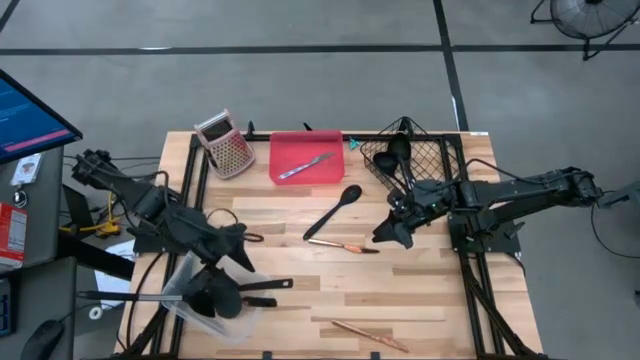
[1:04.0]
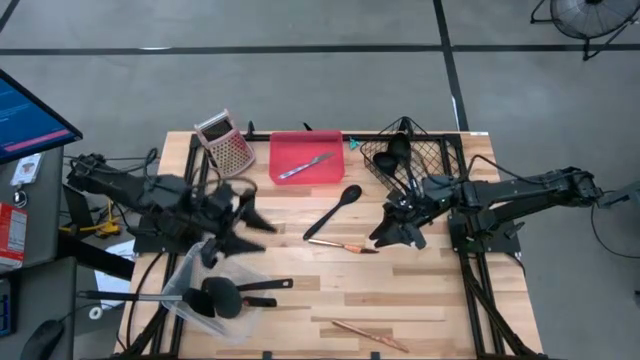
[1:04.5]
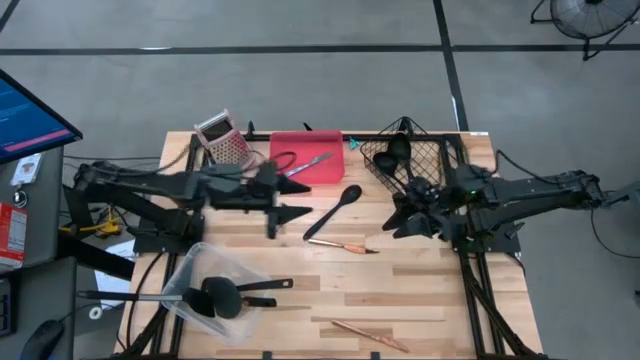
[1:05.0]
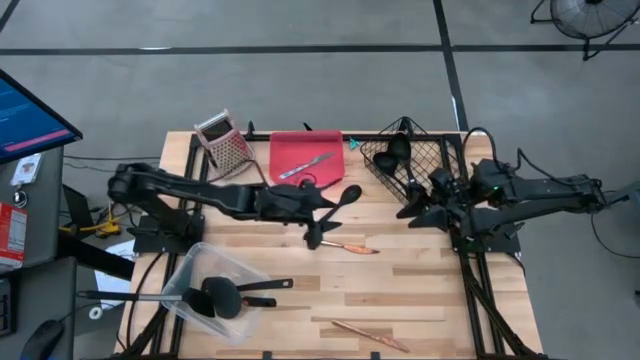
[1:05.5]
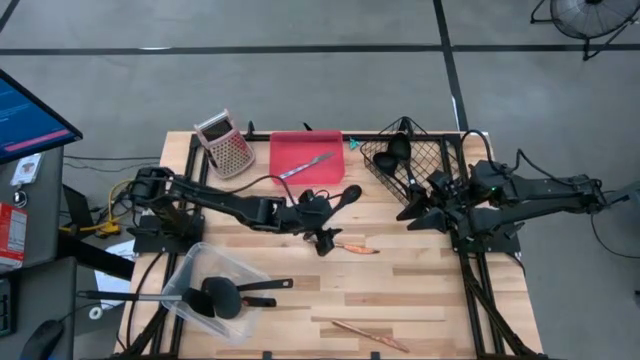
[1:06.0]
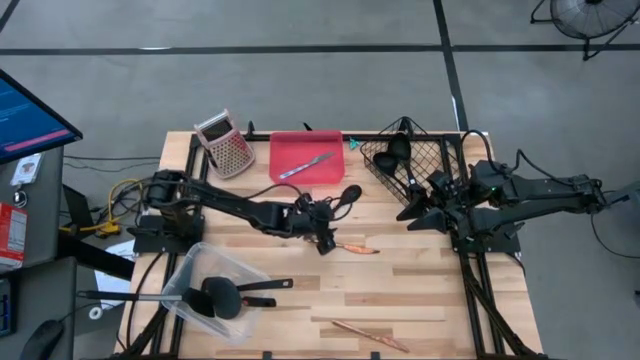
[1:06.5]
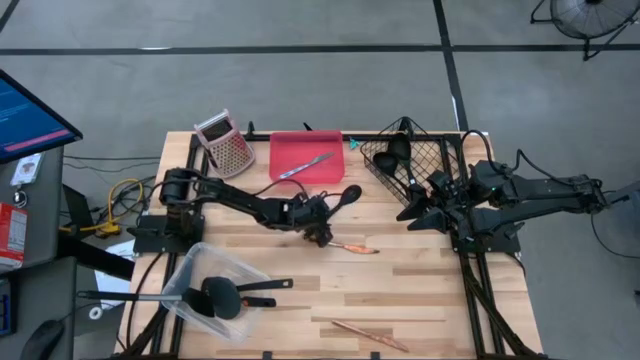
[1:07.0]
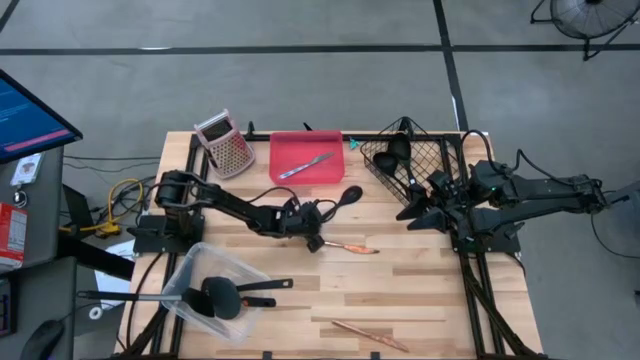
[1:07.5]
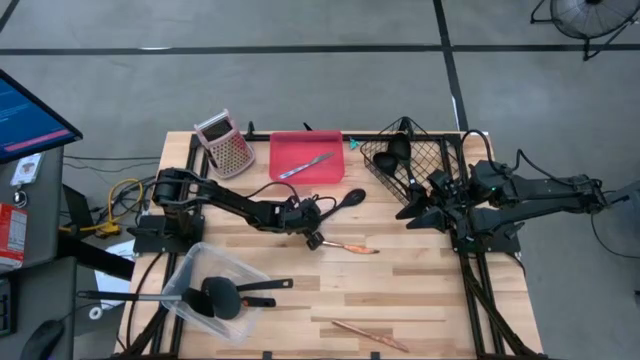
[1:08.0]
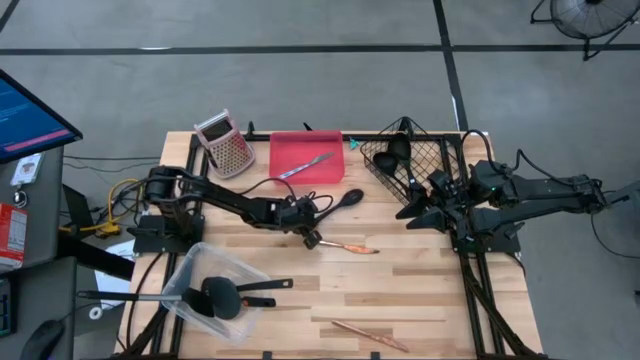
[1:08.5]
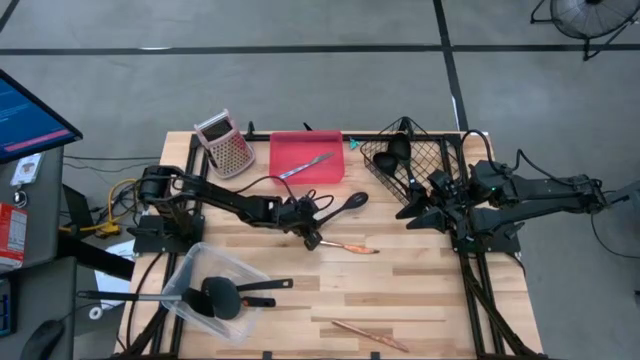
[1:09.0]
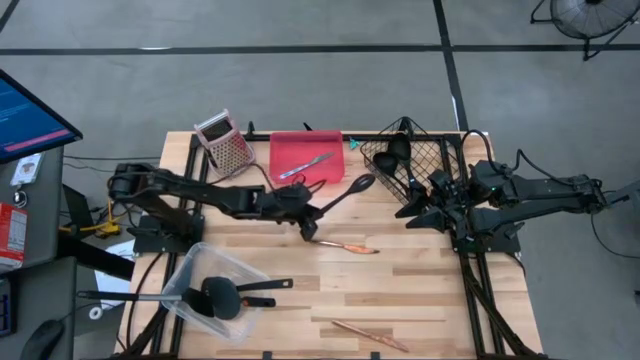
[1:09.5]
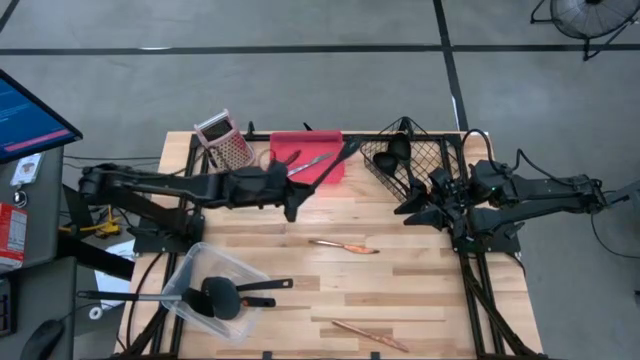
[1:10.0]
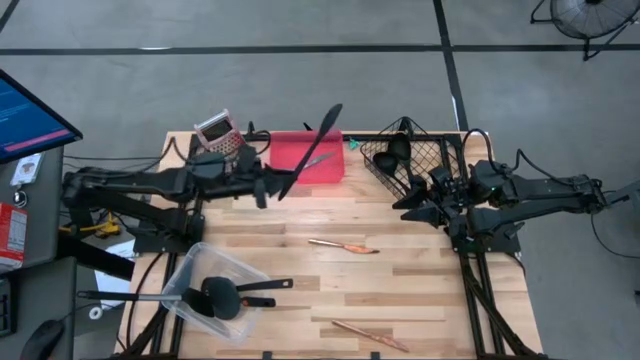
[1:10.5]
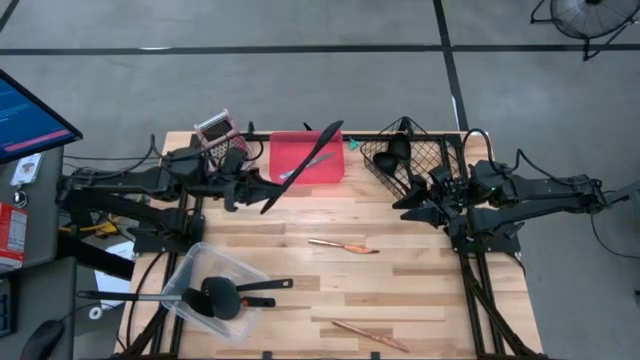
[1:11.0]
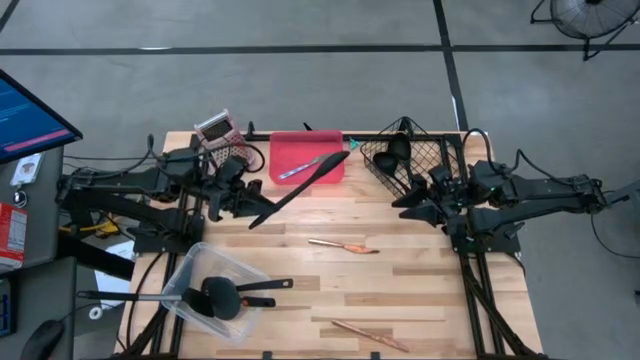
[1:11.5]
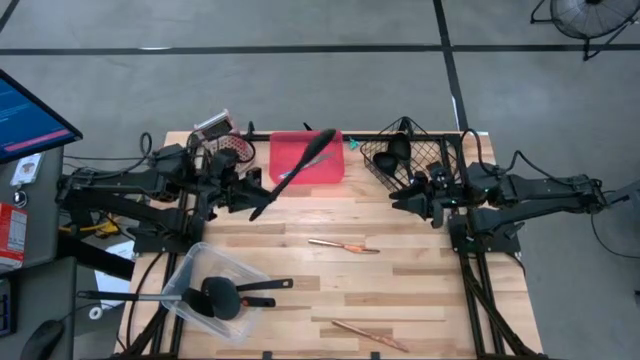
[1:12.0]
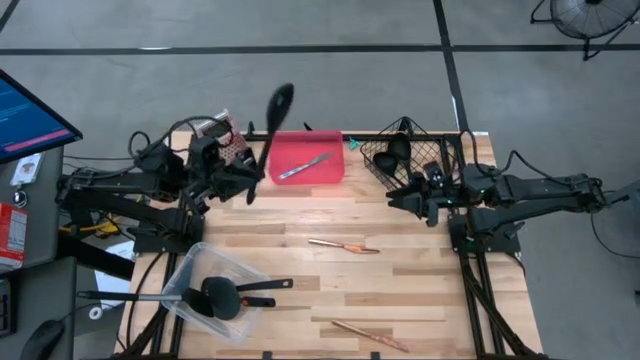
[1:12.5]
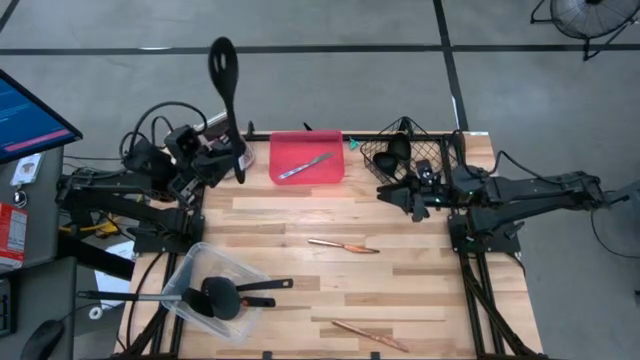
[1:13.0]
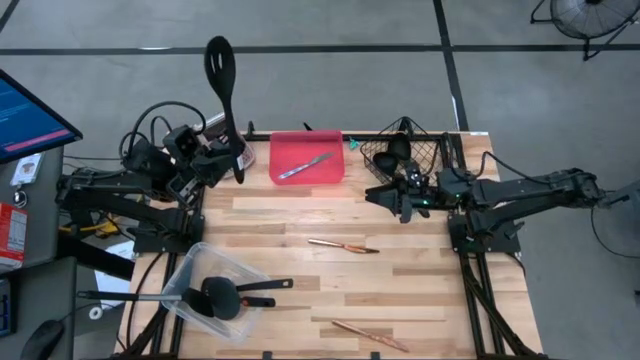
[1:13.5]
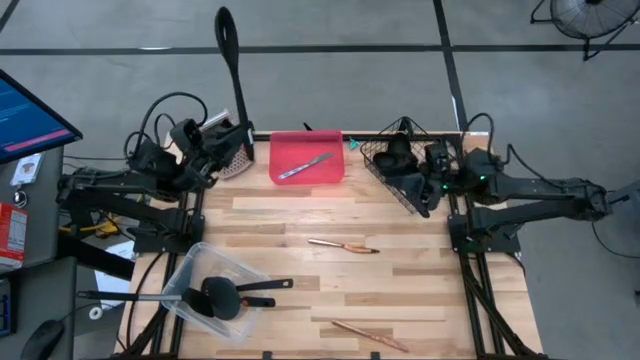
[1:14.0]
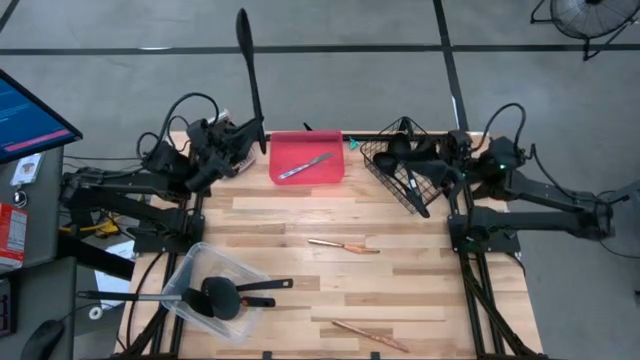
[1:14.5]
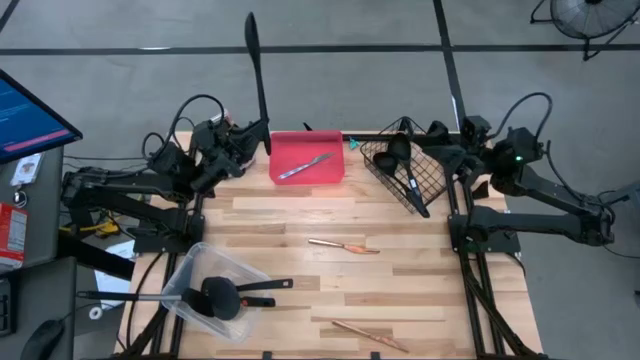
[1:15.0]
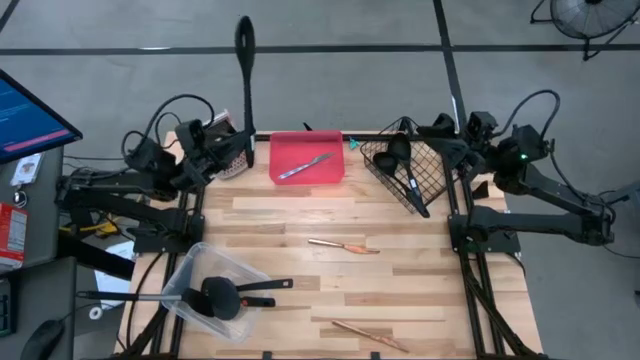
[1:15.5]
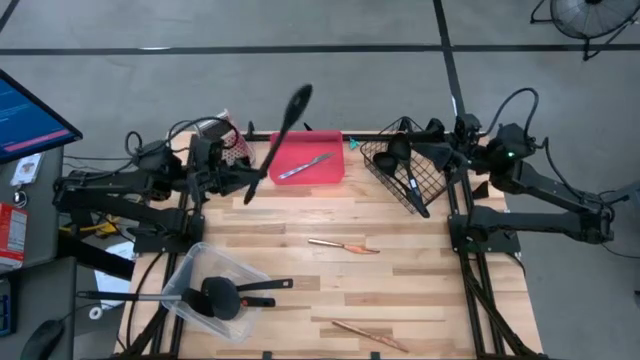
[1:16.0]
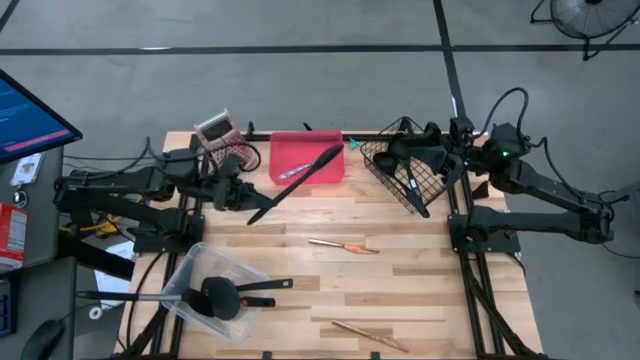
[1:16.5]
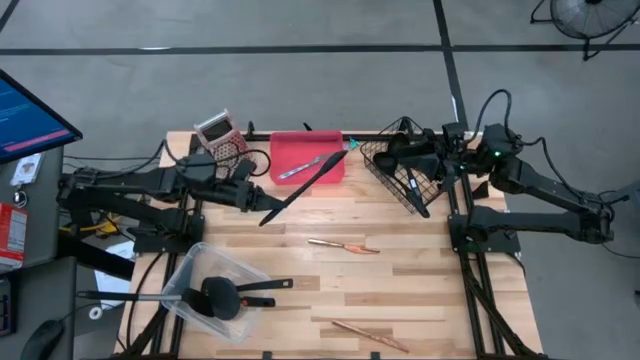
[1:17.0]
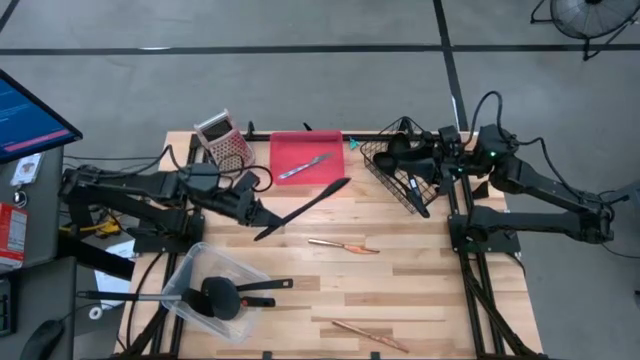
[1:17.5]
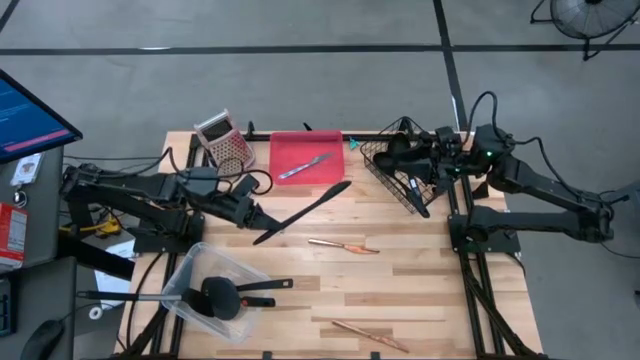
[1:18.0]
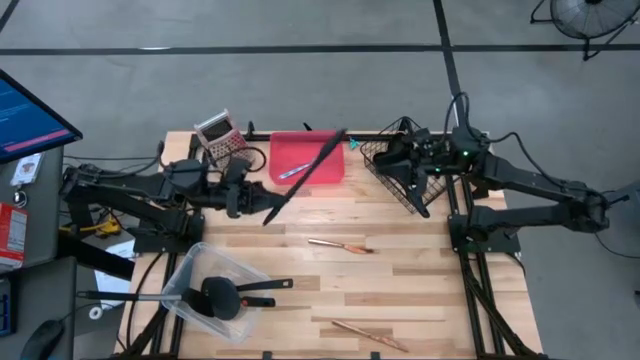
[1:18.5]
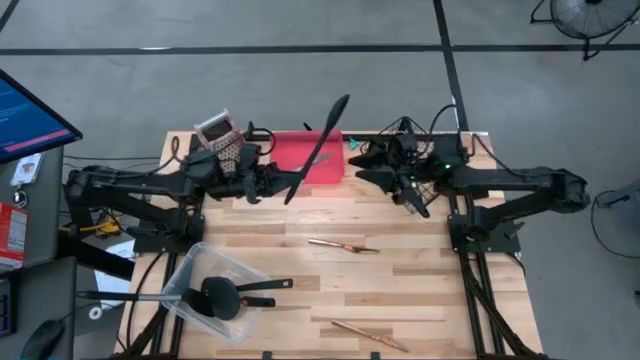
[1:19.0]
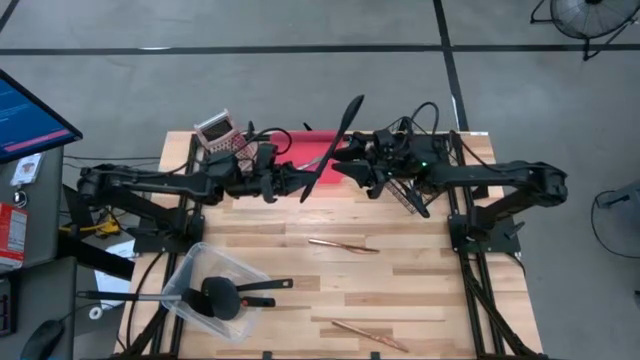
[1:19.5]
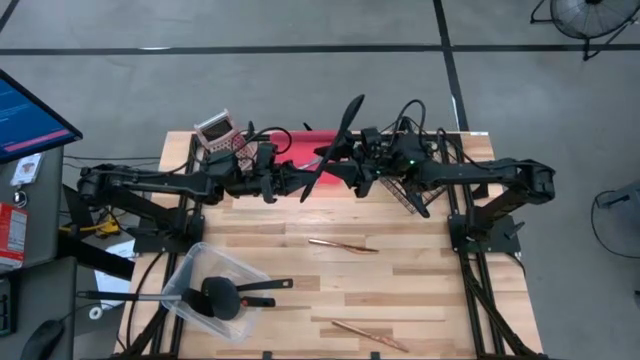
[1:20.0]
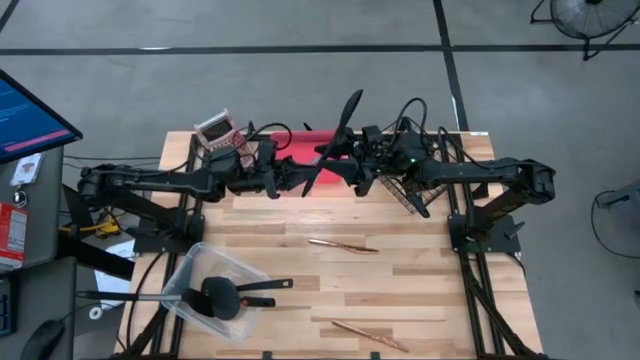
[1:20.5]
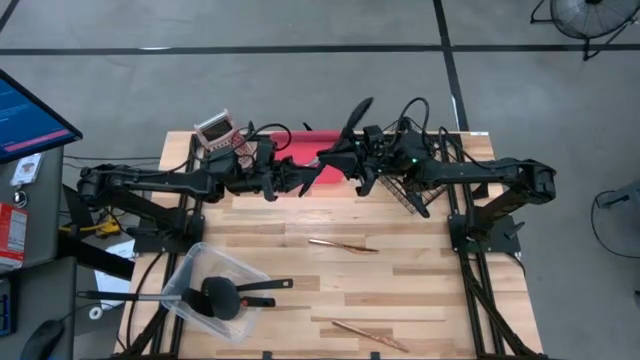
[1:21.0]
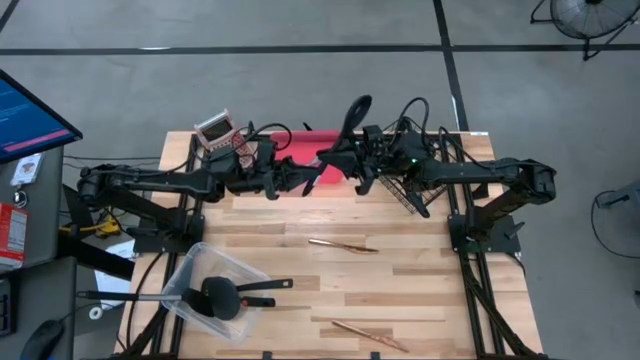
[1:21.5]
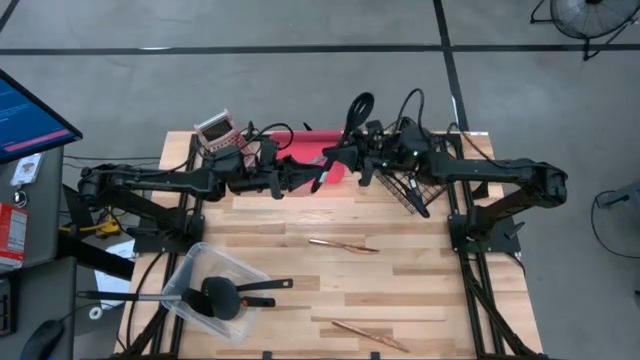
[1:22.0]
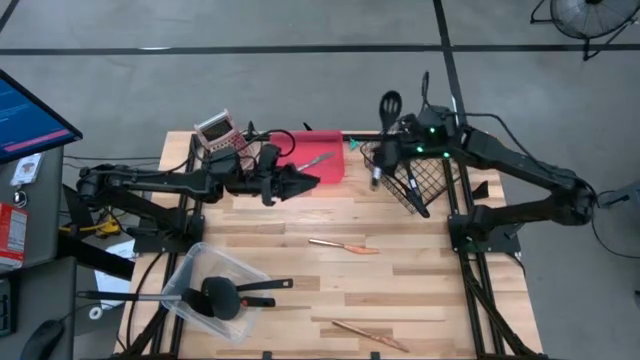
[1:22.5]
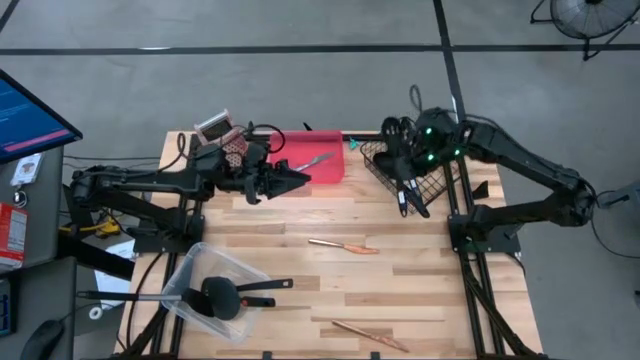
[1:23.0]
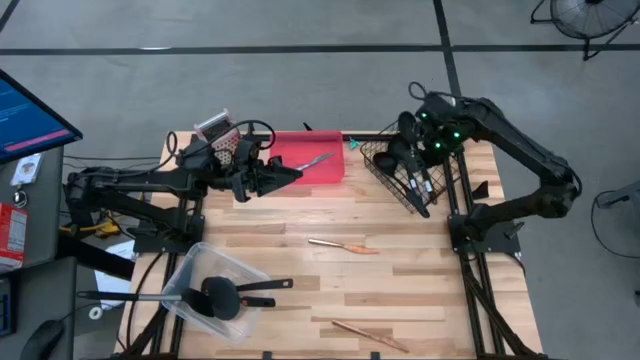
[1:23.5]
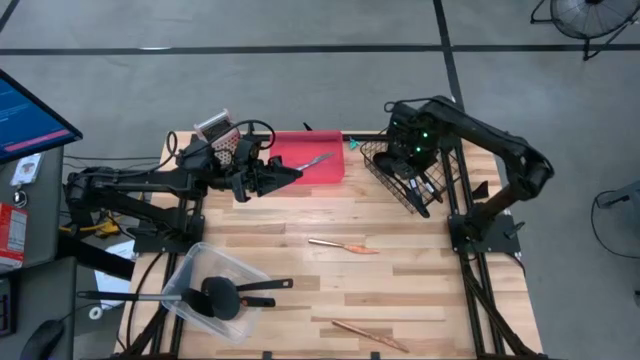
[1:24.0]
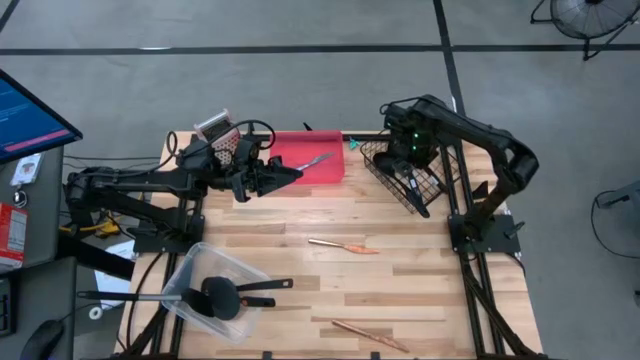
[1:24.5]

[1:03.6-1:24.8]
Task: Pick & Place Kitchen Items
Put the black ladle into the wire basket
